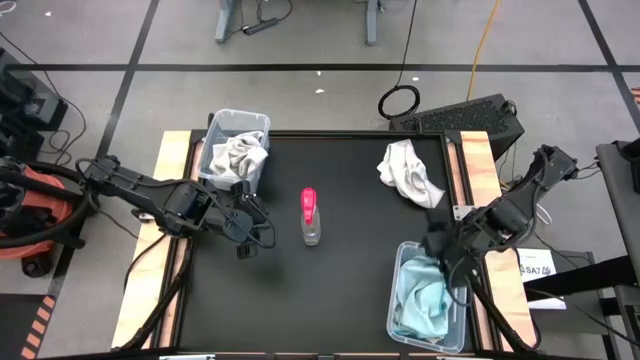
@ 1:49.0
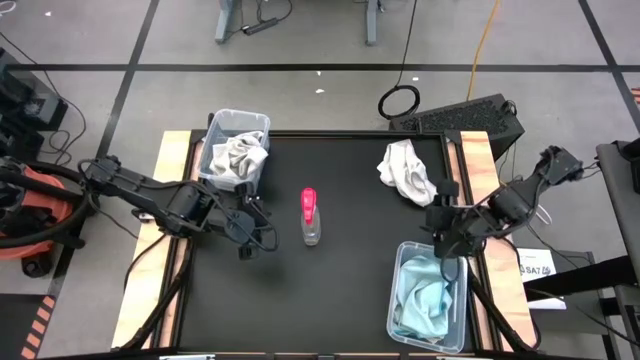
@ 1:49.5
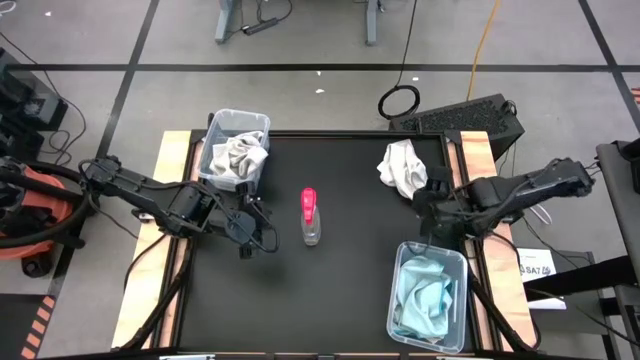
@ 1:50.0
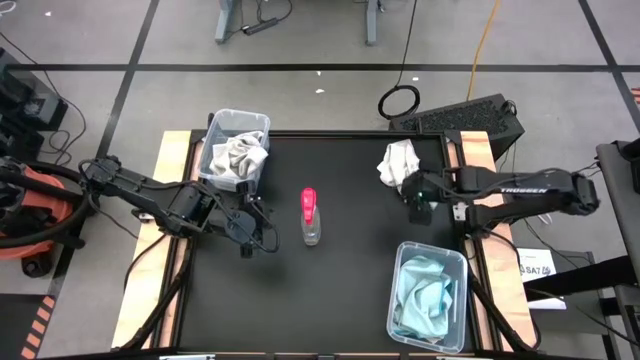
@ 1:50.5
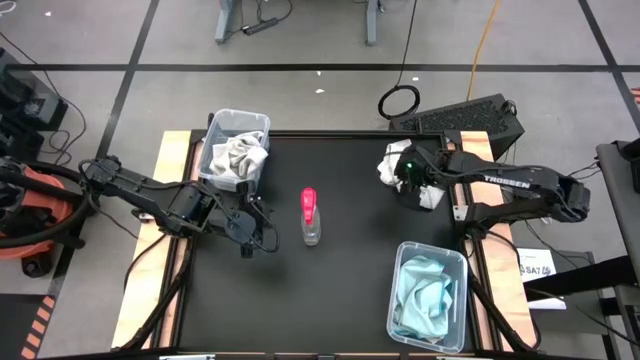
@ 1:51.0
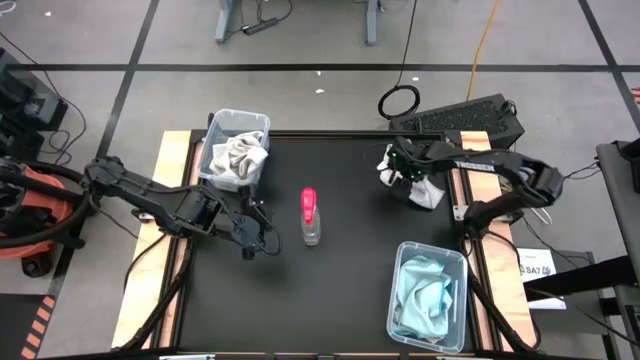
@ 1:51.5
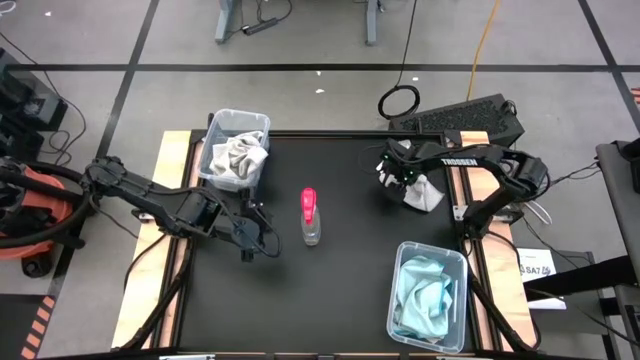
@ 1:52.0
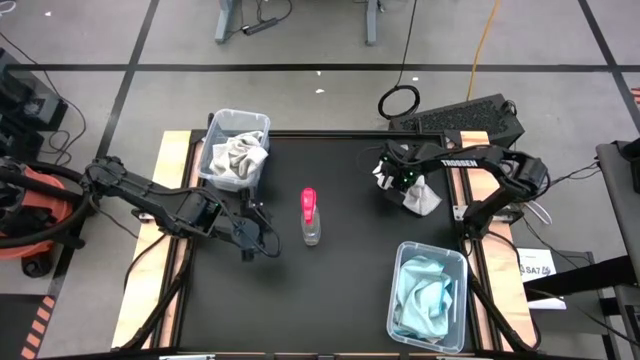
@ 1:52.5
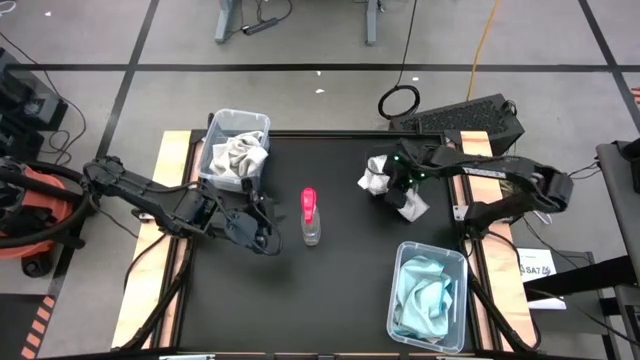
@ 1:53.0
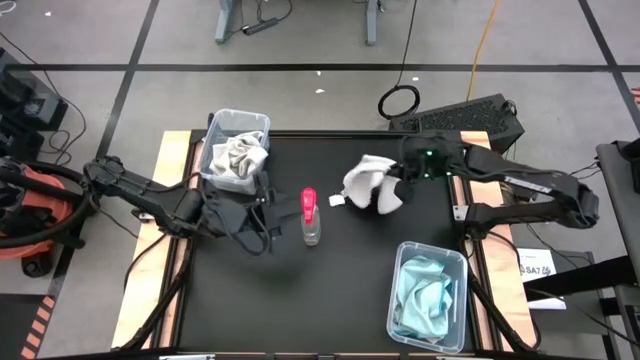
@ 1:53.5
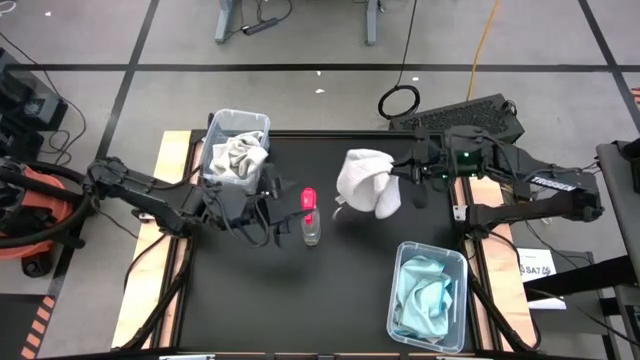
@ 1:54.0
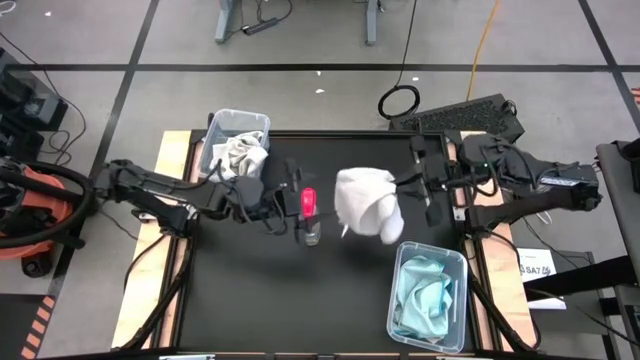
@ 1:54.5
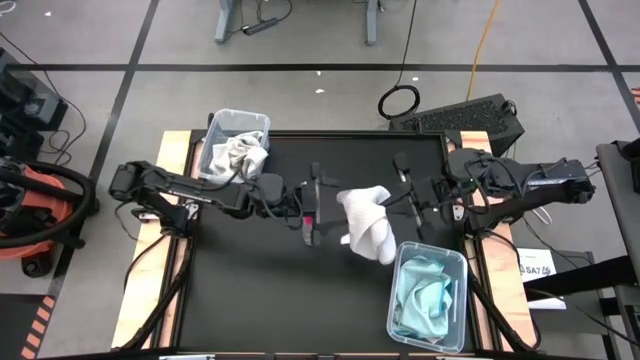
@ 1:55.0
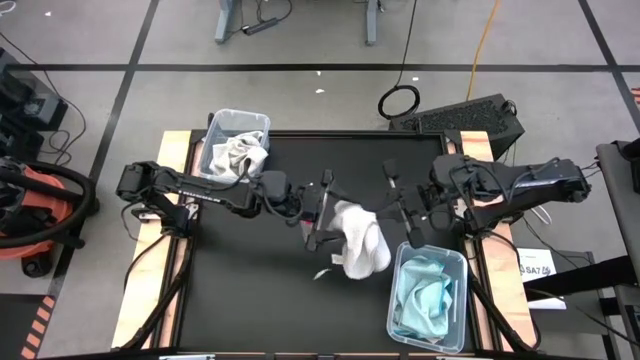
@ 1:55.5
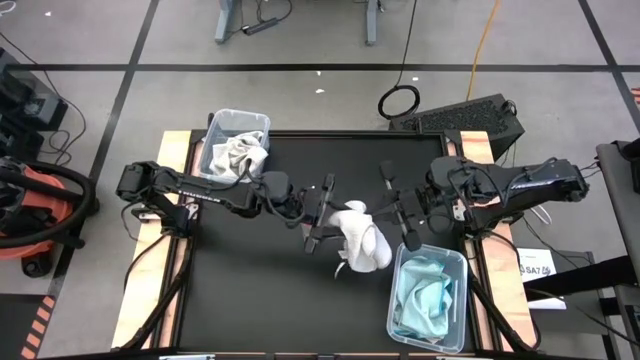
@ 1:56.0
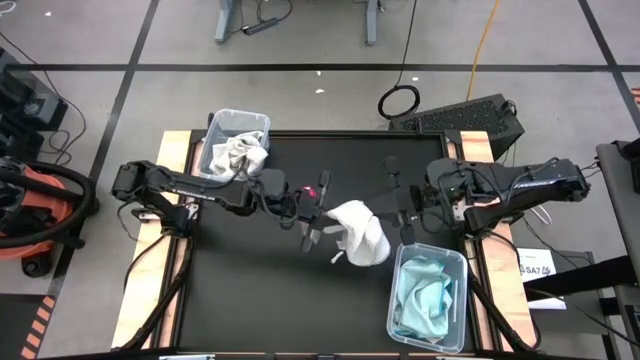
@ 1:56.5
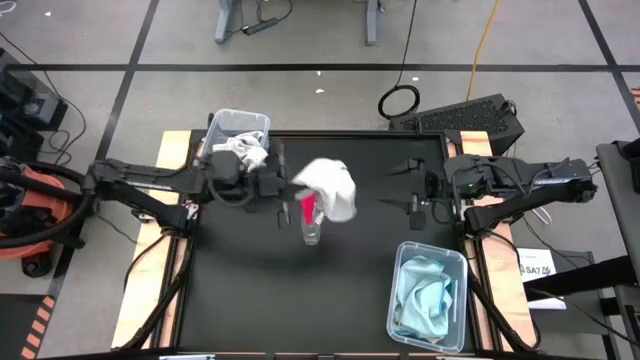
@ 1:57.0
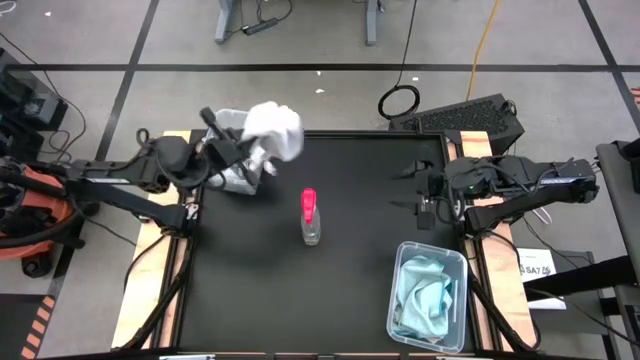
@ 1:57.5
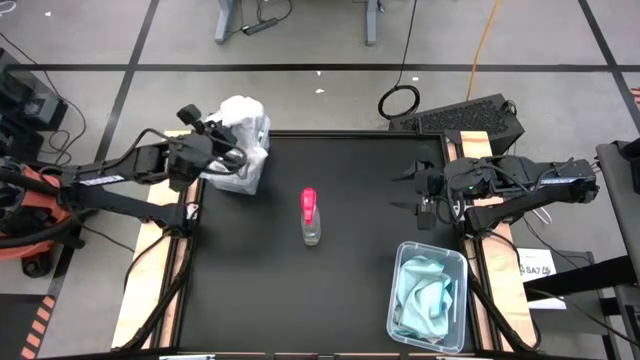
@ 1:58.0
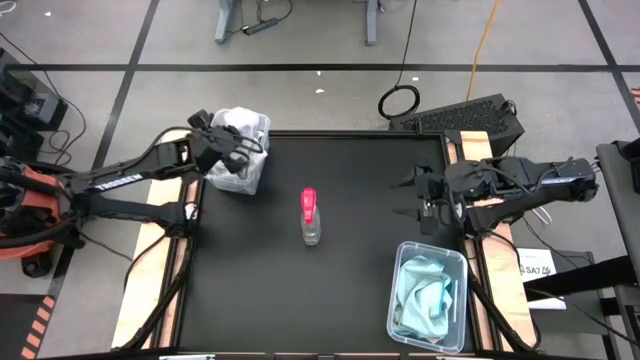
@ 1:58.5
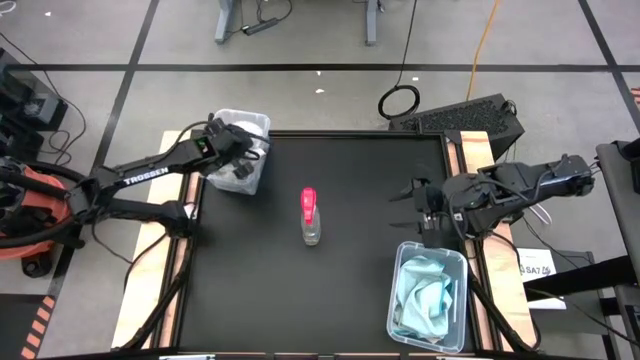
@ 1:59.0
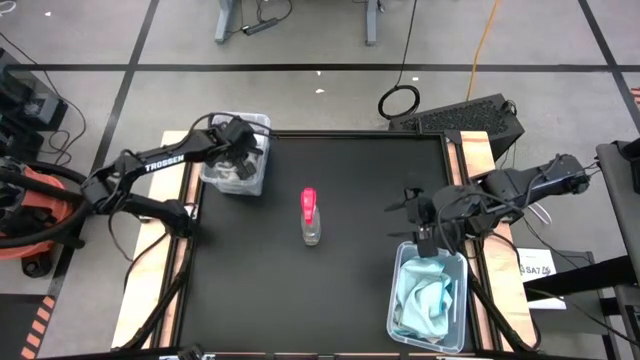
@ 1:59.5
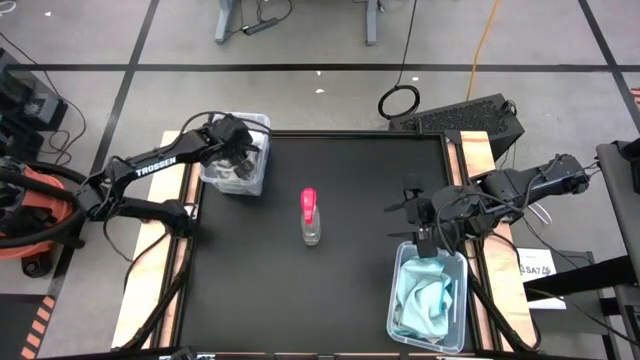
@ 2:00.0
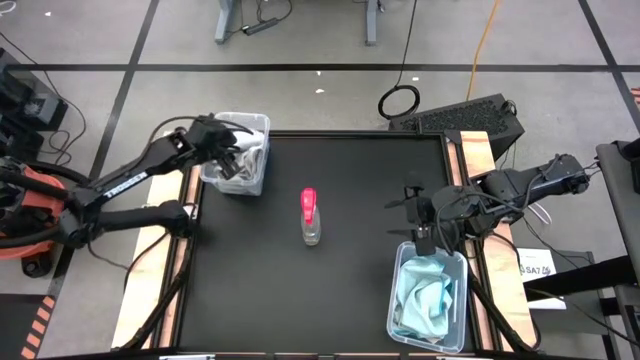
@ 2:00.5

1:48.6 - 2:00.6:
Task: Sort microfiber towel by color & place in baskets
Put the gray towel into the left transparent bin

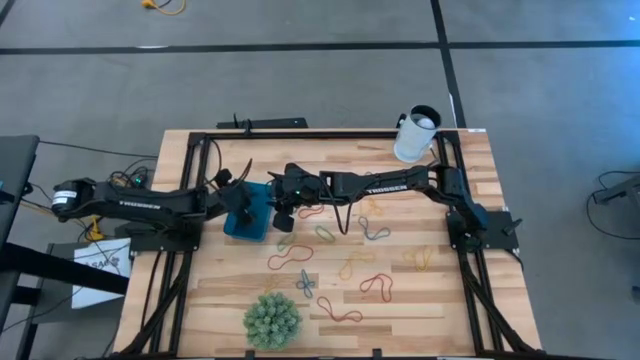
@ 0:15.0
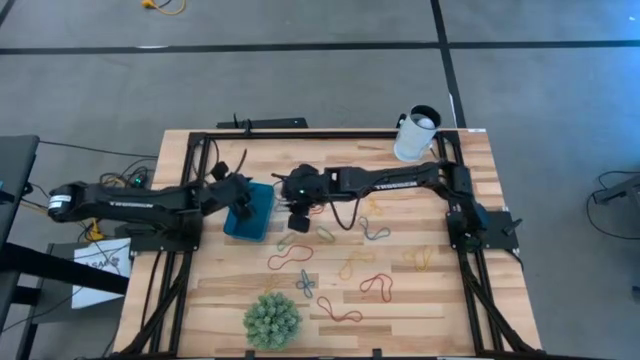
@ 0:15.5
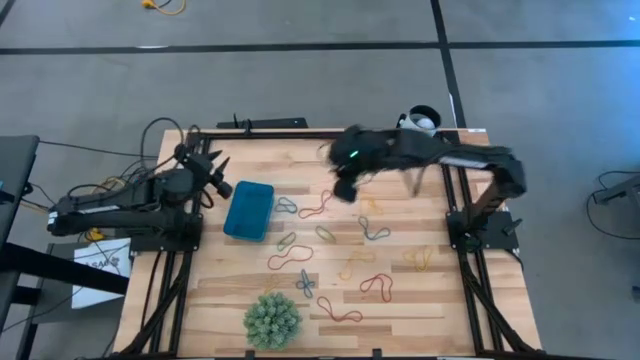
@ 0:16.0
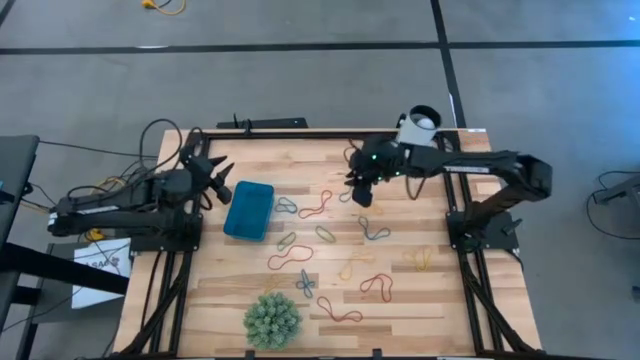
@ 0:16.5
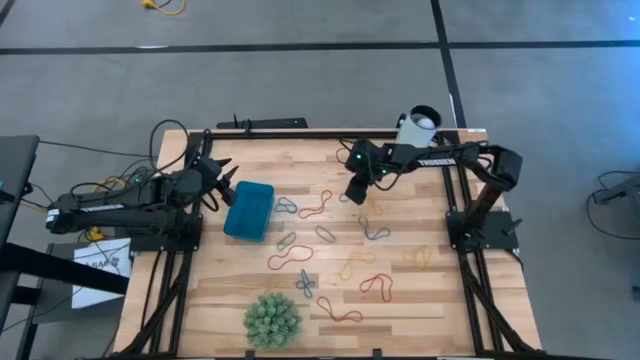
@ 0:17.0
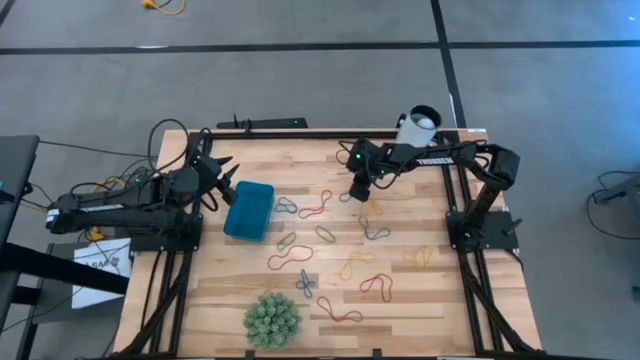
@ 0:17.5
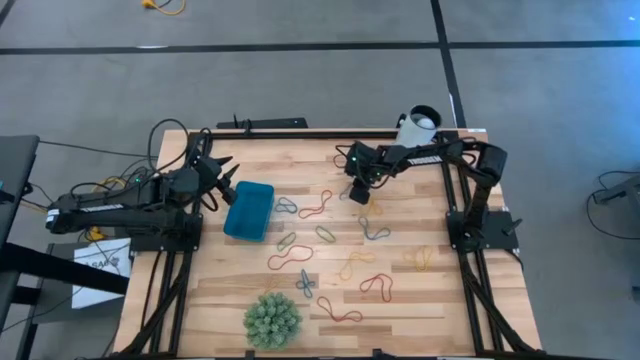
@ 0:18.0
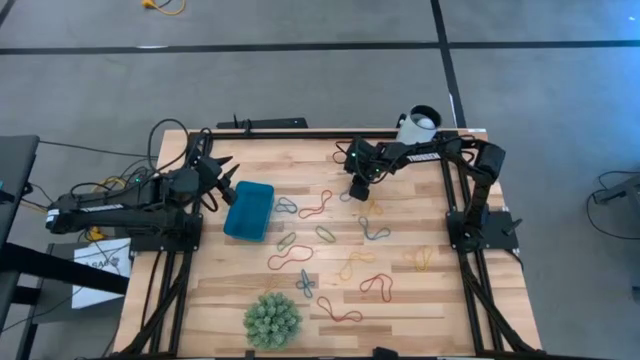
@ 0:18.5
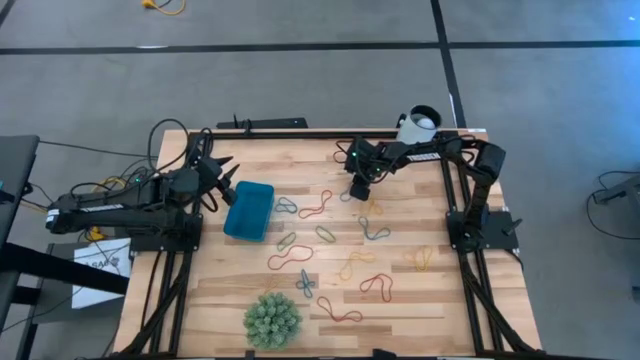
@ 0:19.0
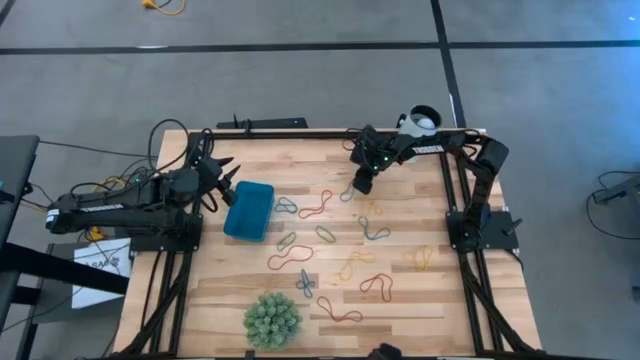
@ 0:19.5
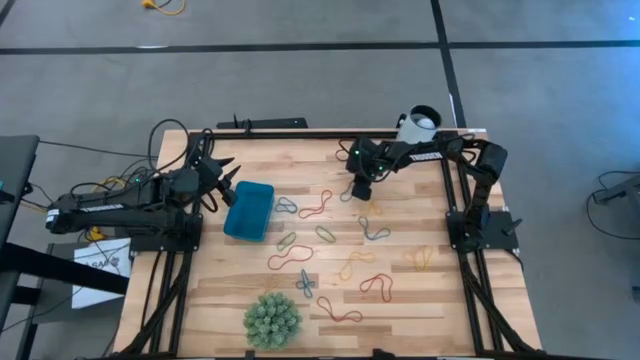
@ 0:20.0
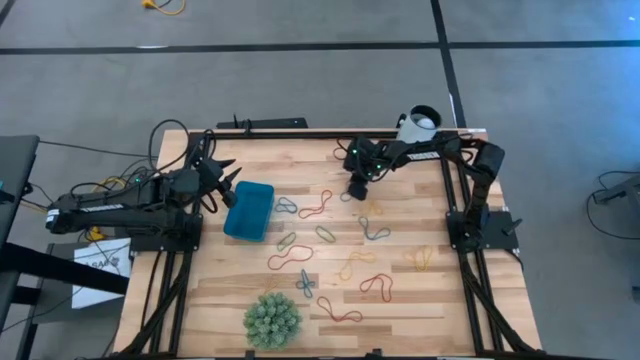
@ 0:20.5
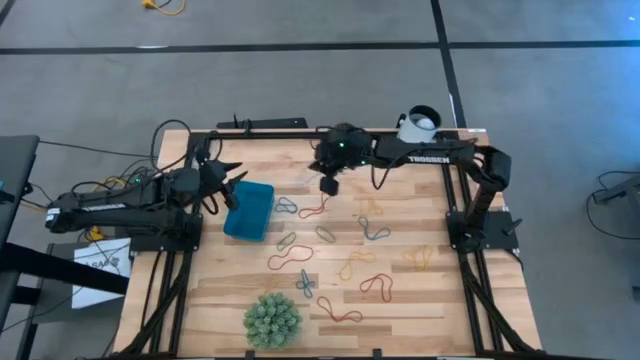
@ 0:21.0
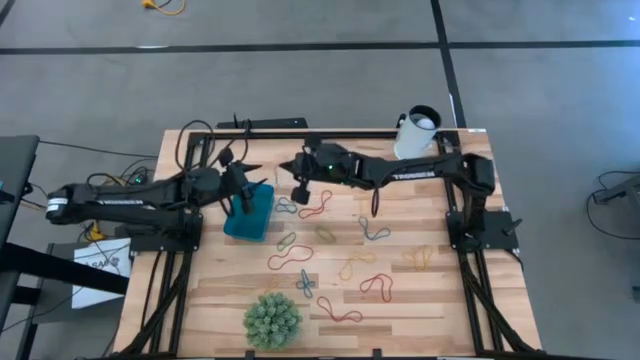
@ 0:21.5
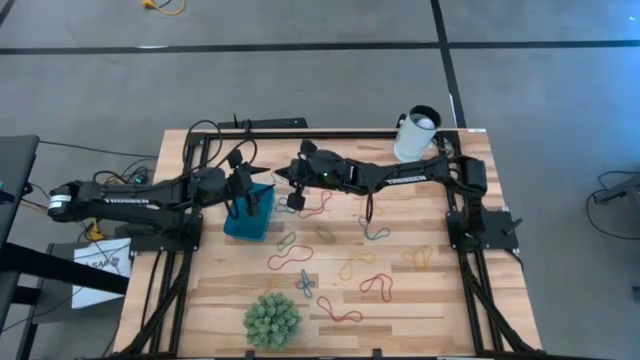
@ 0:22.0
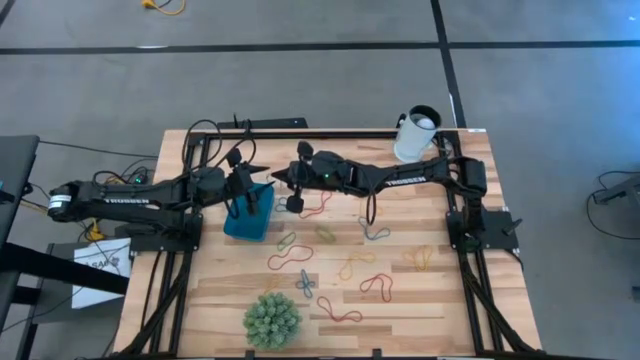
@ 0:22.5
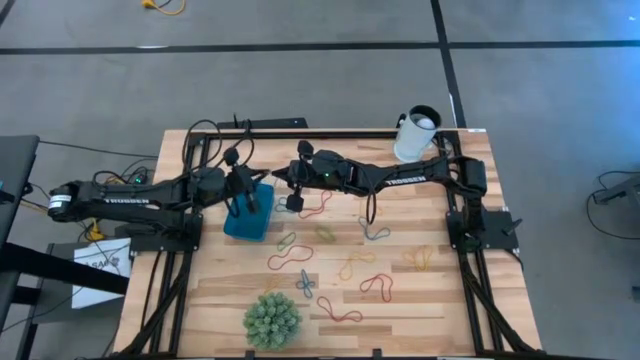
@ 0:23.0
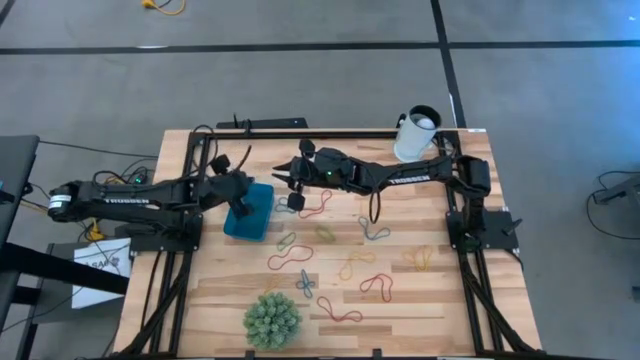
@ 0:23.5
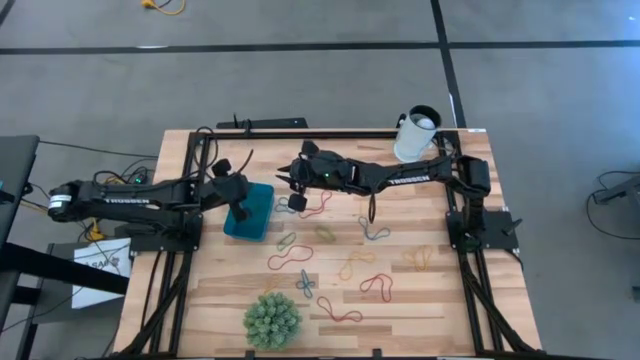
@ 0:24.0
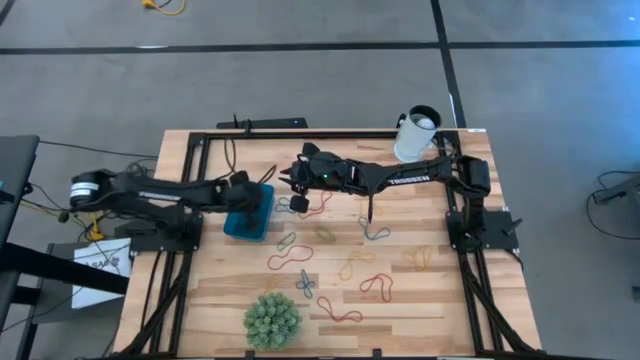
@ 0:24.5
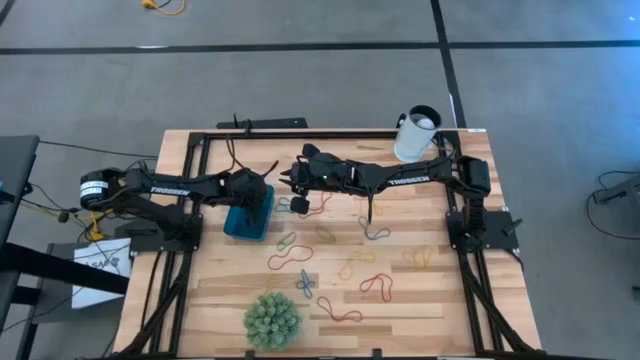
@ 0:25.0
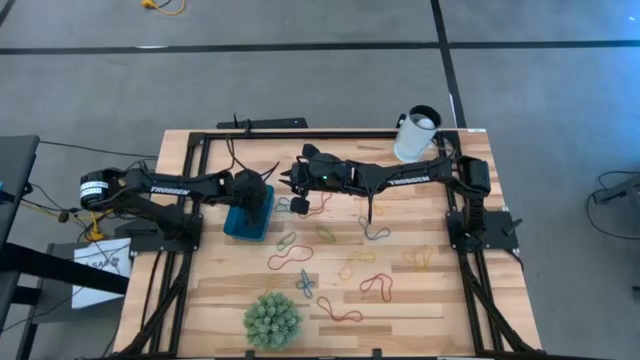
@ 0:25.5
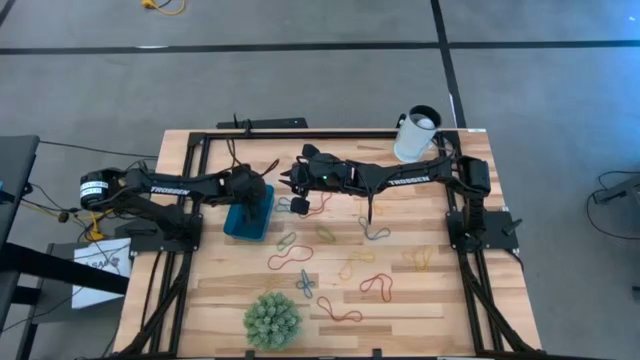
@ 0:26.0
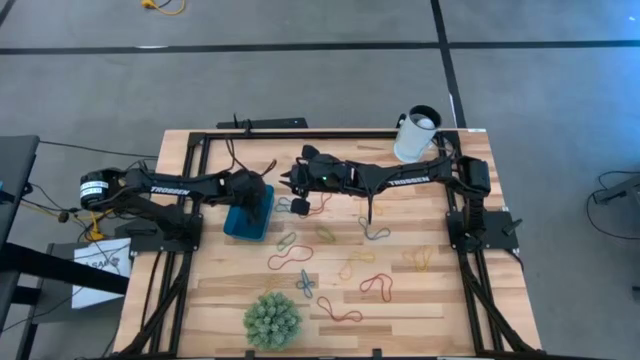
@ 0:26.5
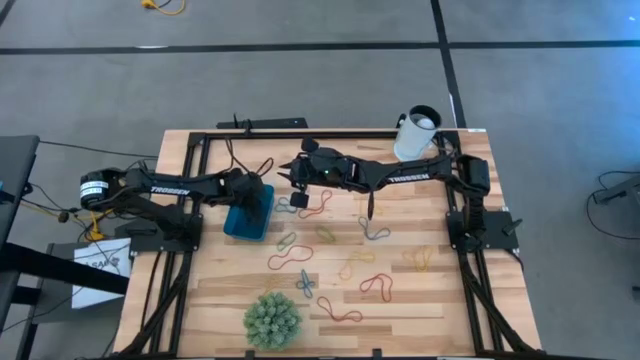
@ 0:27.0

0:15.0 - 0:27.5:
Task: Pick and place items into bin
Put the blue rubber band into the blue bin
